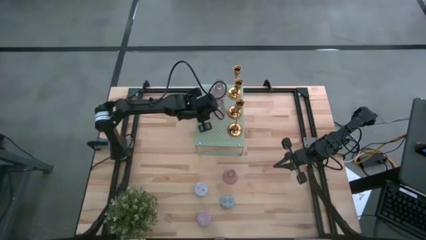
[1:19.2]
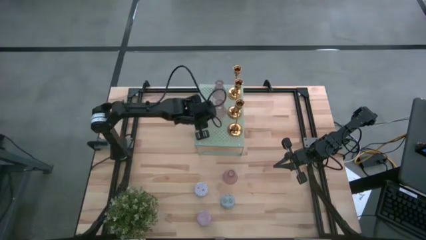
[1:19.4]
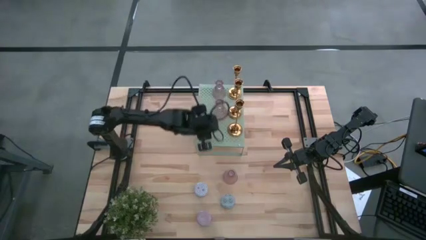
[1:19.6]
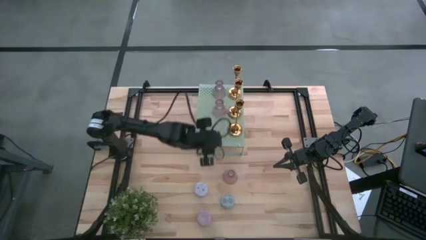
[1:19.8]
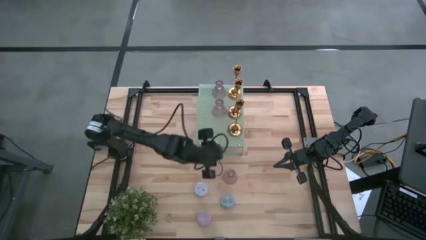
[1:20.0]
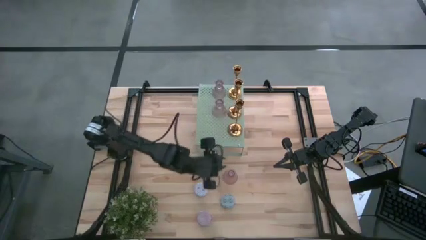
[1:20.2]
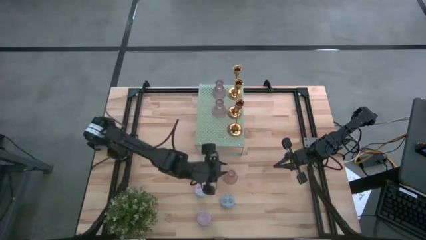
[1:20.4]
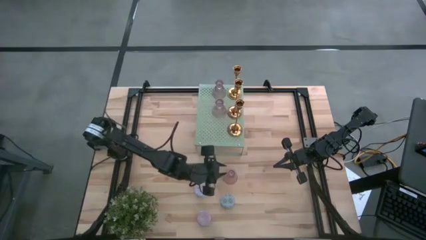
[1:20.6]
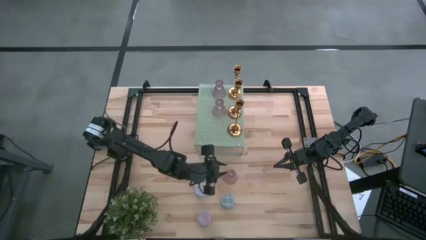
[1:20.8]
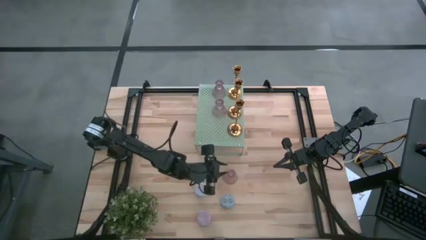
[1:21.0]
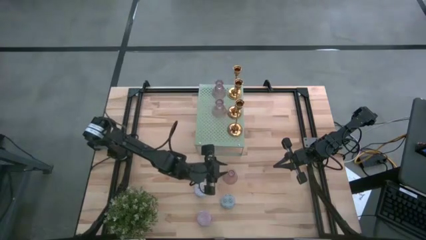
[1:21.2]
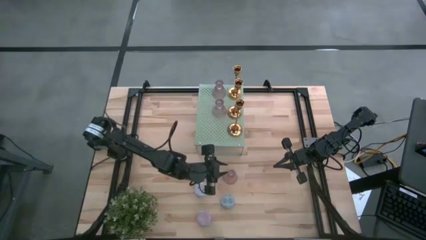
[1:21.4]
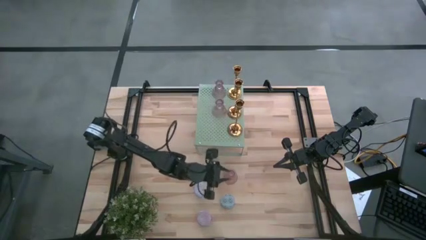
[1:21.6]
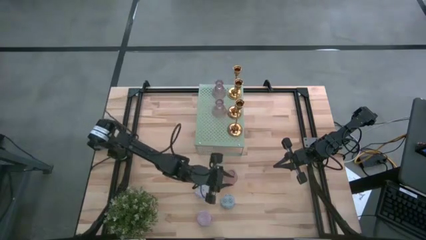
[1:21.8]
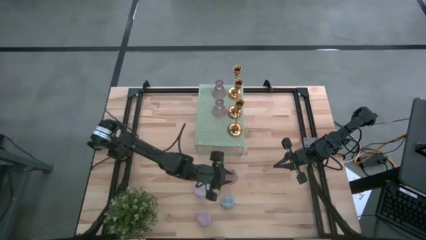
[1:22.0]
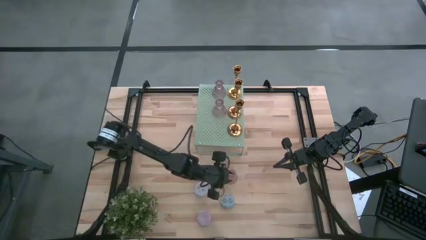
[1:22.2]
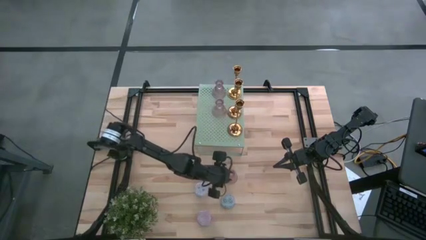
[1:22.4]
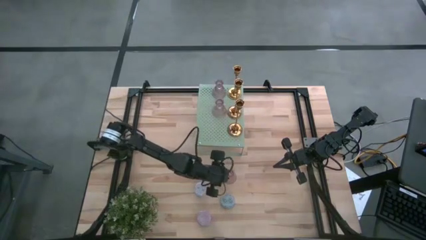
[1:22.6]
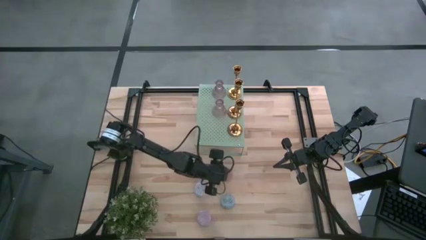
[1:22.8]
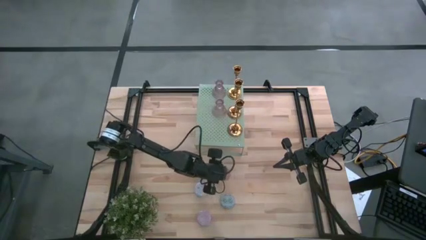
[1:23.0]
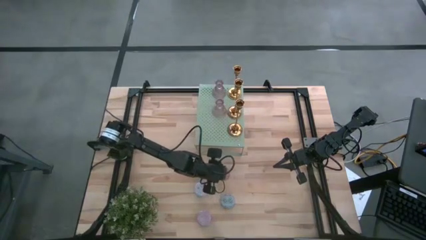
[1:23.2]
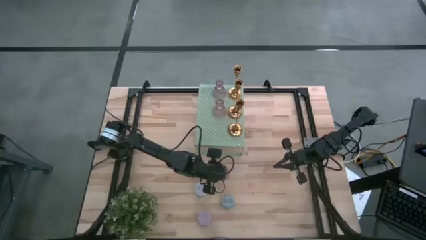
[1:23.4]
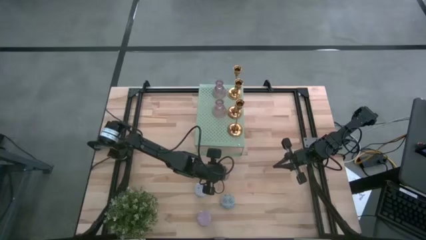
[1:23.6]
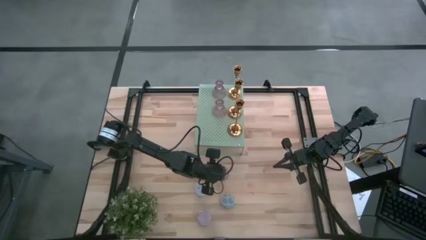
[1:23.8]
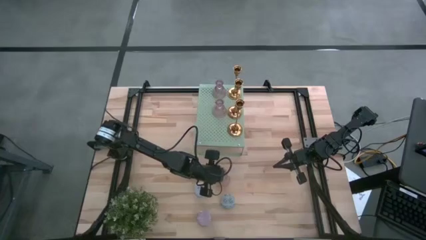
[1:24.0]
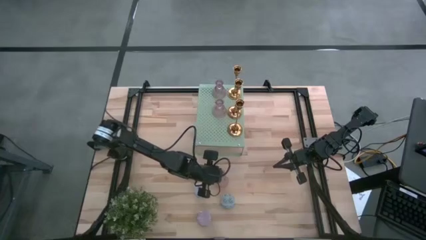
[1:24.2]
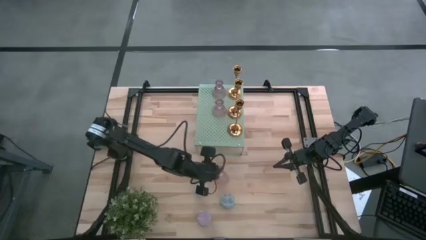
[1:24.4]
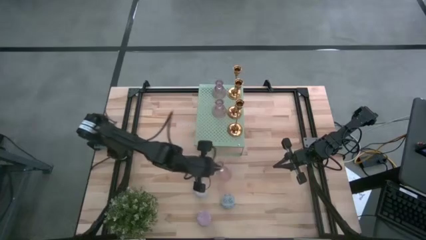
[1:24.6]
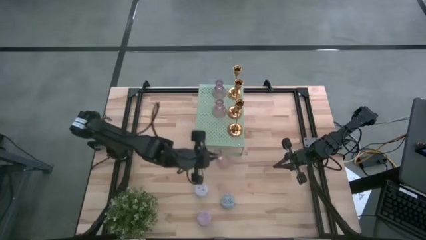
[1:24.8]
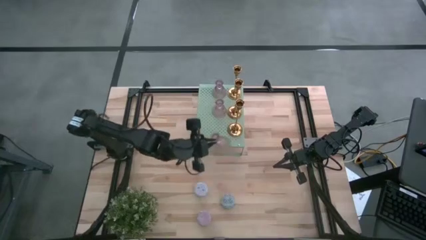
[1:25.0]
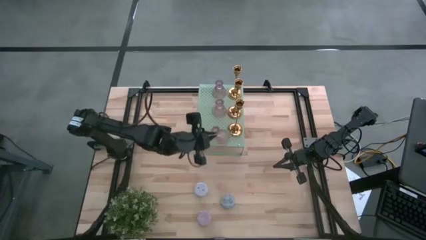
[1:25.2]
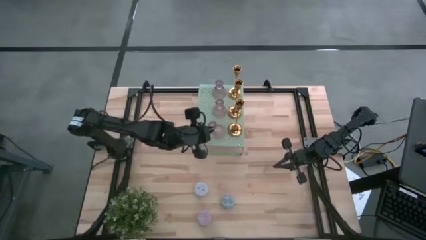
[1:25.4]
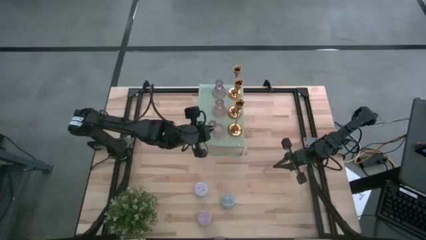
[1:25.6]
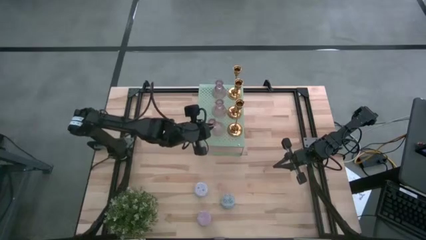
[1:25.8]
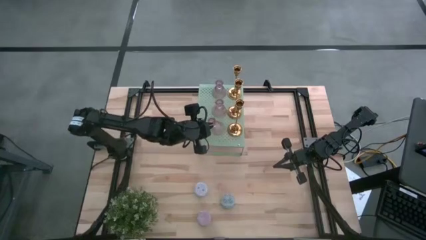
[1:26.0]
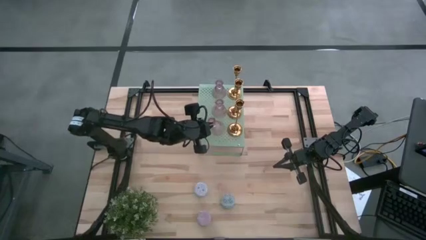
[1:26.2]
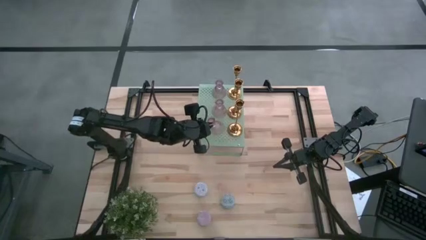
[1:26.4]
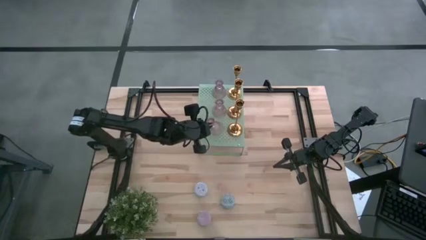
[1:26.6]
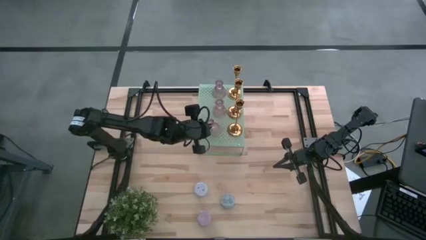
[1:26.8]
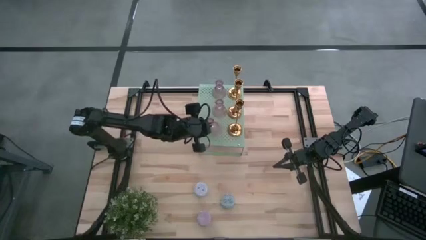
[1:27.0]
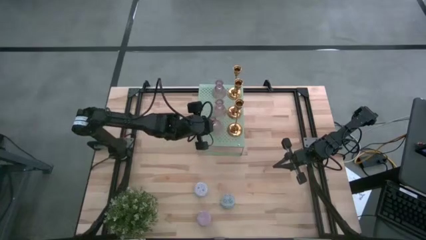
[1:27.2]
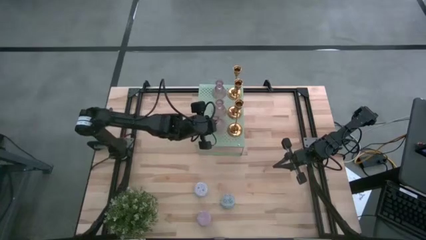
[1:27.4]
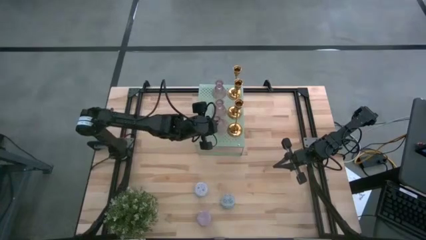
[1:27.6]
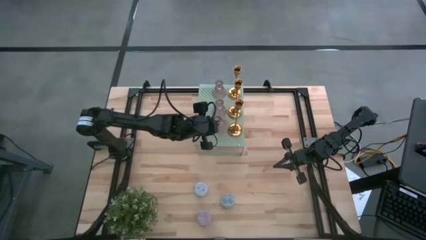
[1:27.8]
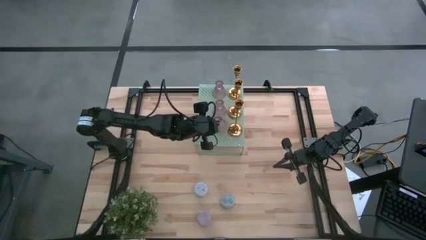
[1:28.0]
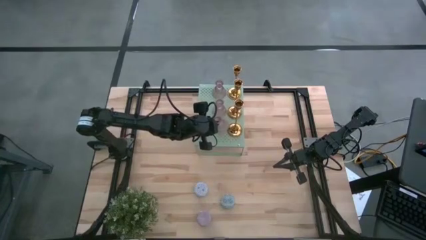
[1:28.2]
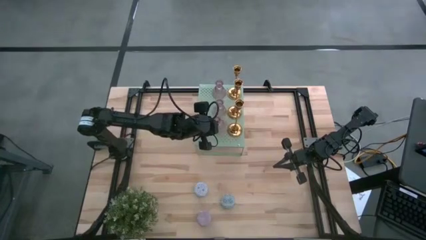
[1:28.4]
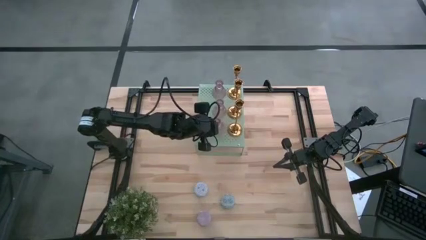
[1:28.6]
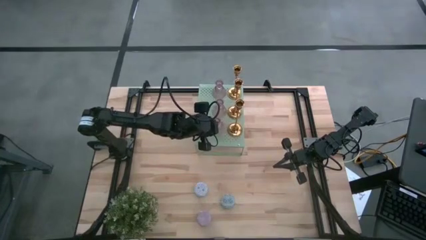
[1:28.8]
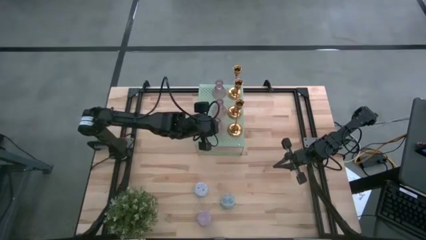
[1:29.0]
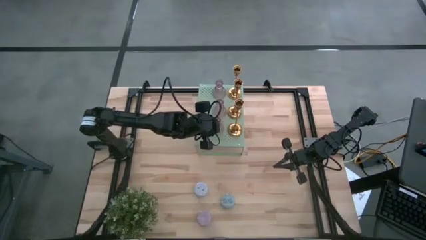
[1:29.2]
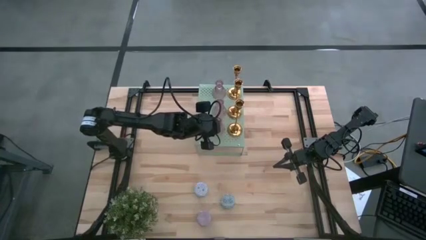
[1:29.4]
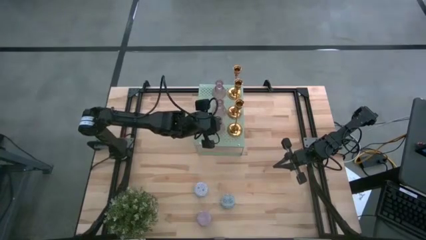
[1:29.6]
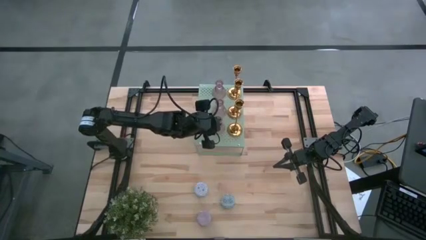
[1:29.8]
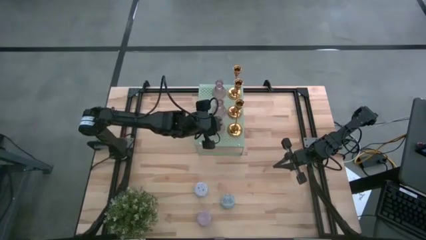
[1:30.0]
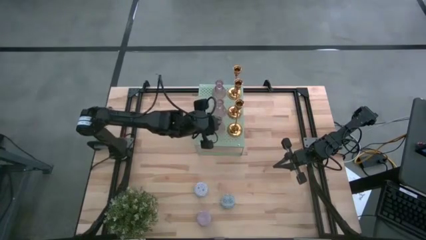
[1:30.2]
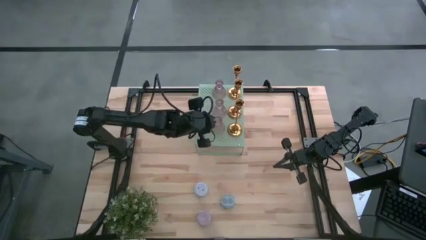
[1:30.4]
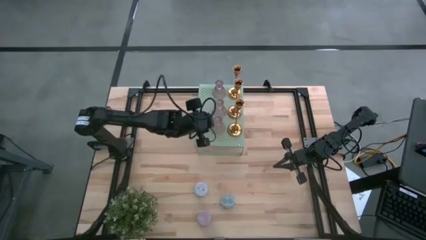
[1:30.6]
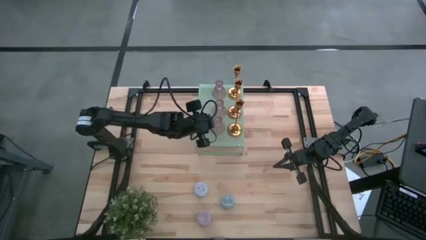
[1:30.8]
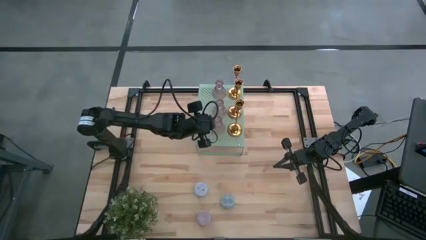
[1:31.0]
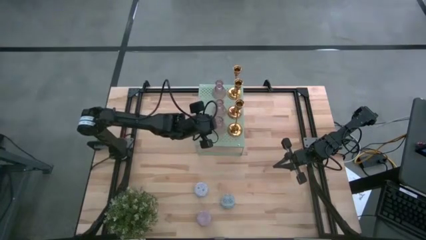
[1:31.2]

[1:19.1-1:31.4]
Task: Pick & Place candle stick holders
Put the pink candle holder on the shelf align with other pink candle holders
